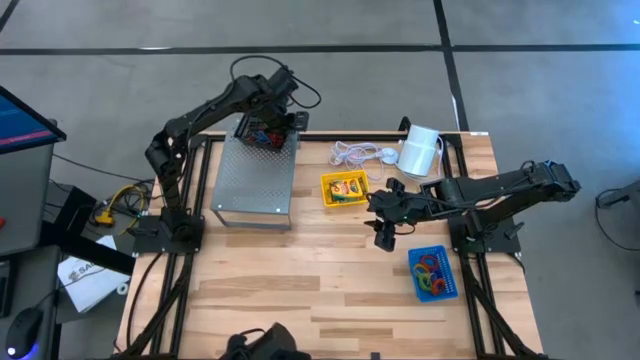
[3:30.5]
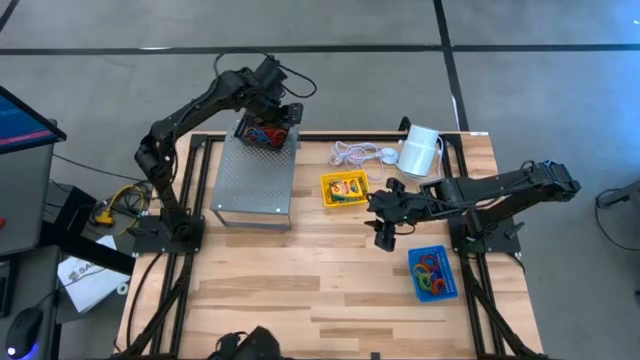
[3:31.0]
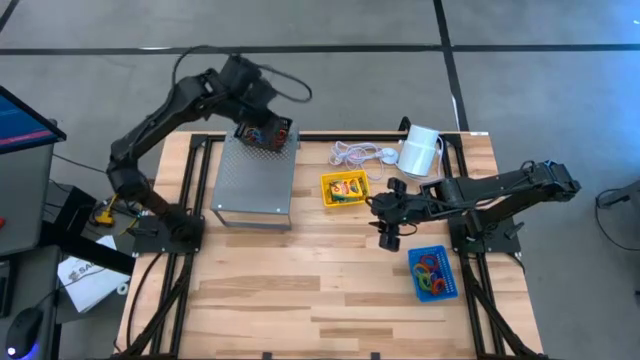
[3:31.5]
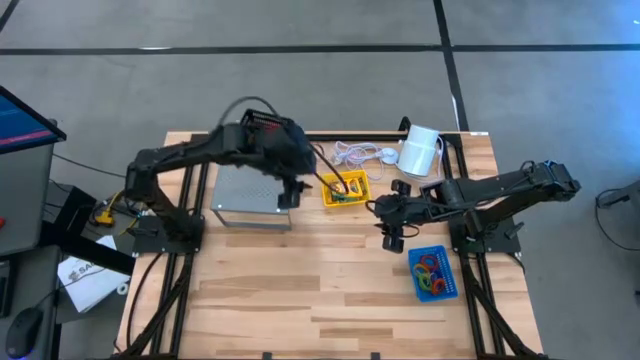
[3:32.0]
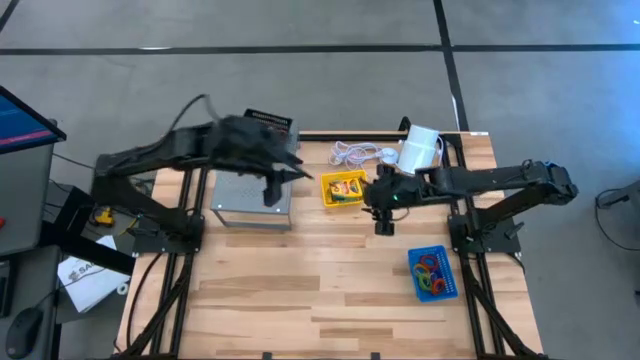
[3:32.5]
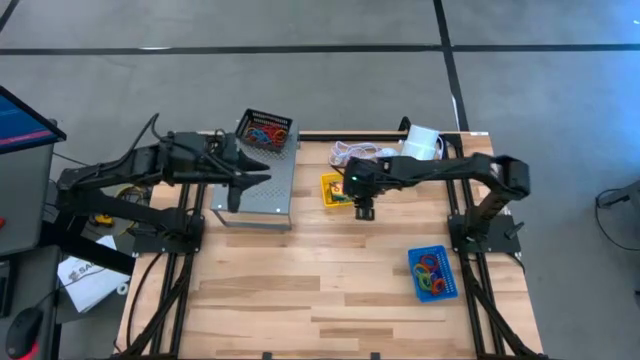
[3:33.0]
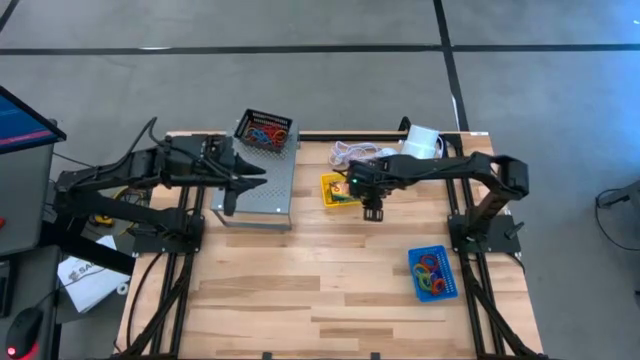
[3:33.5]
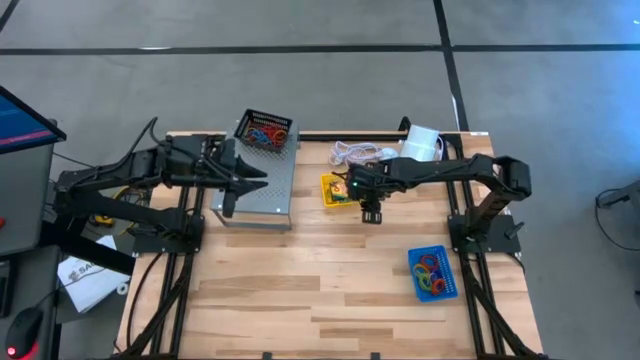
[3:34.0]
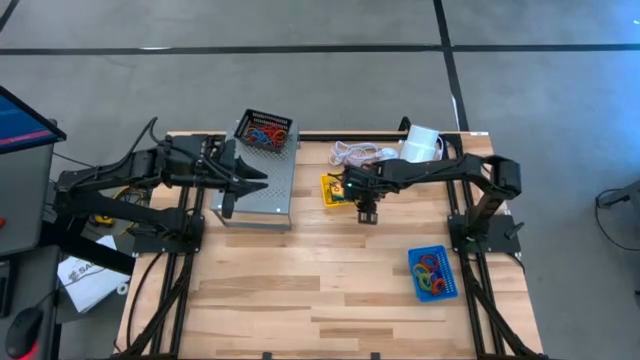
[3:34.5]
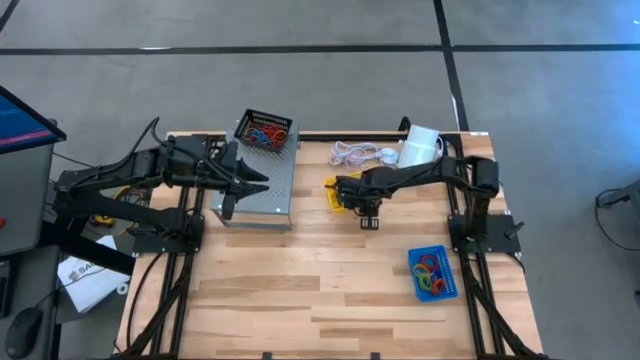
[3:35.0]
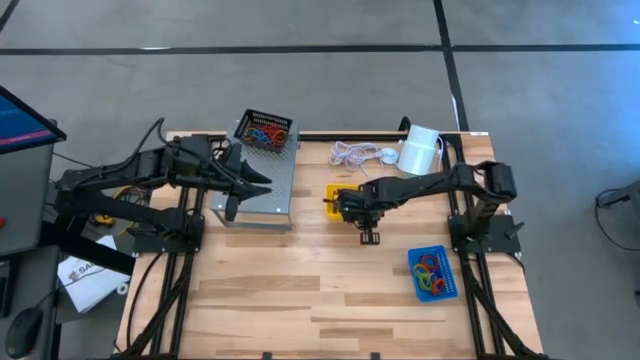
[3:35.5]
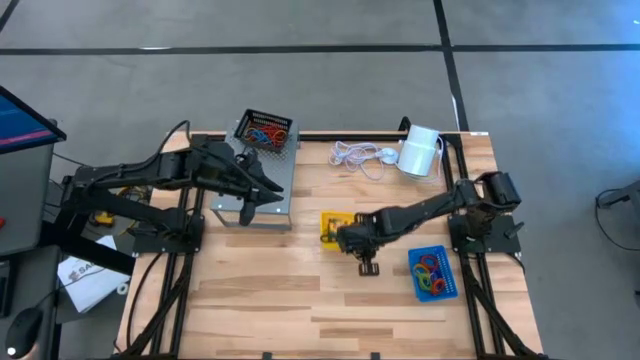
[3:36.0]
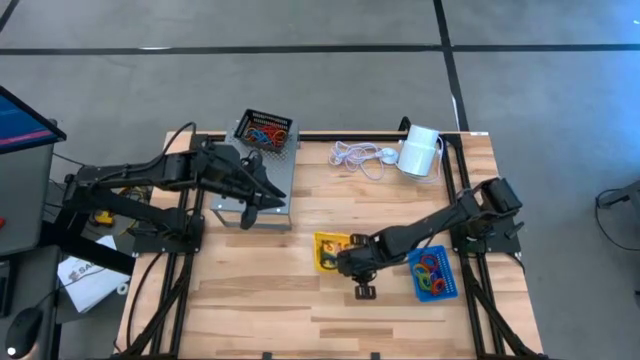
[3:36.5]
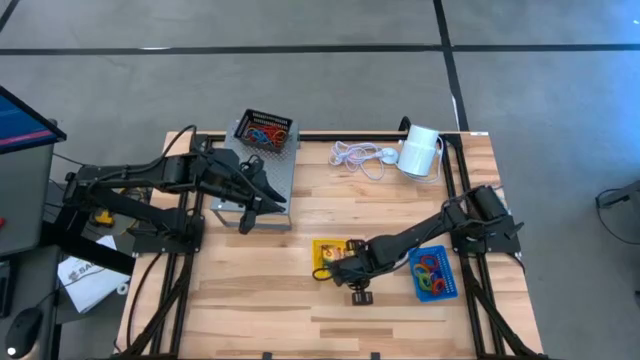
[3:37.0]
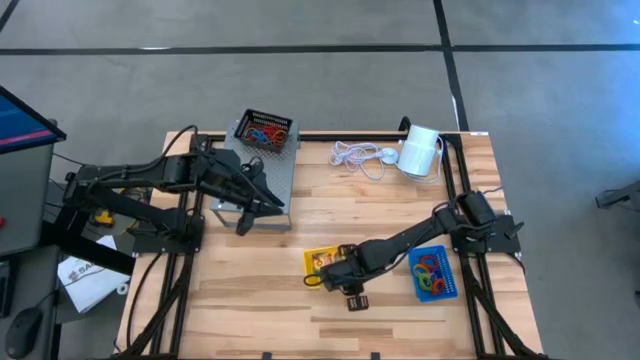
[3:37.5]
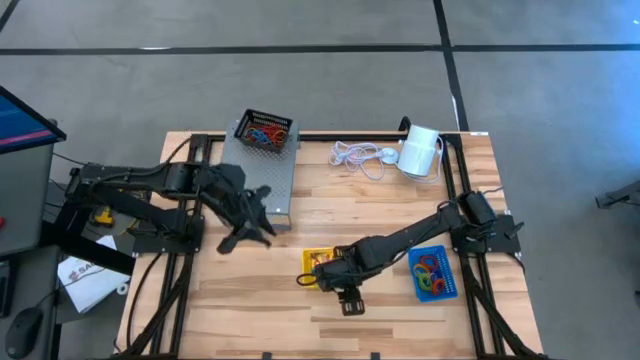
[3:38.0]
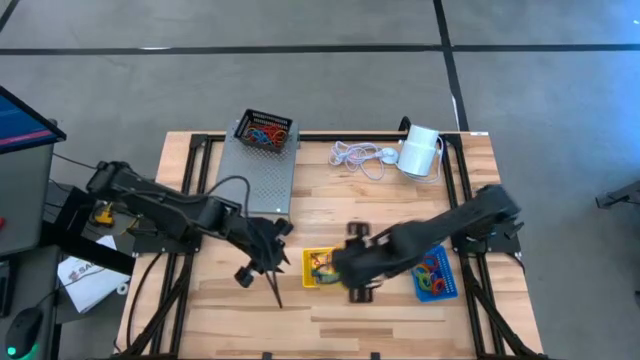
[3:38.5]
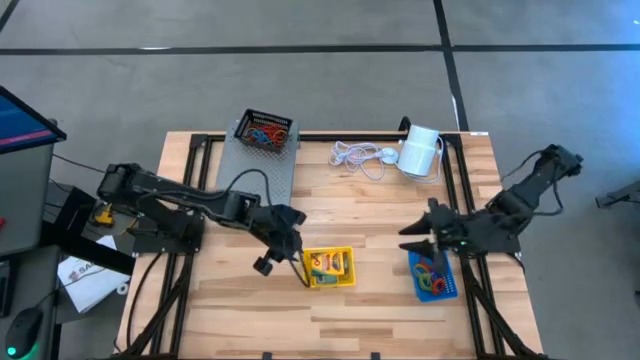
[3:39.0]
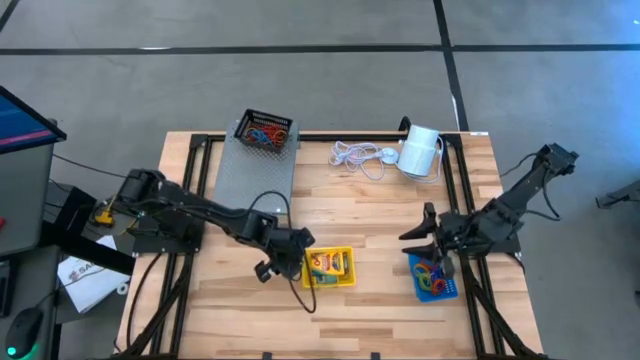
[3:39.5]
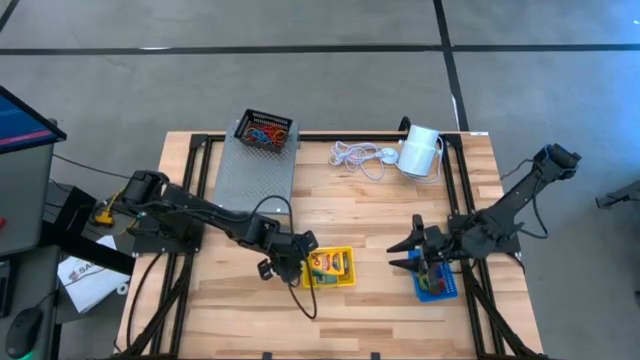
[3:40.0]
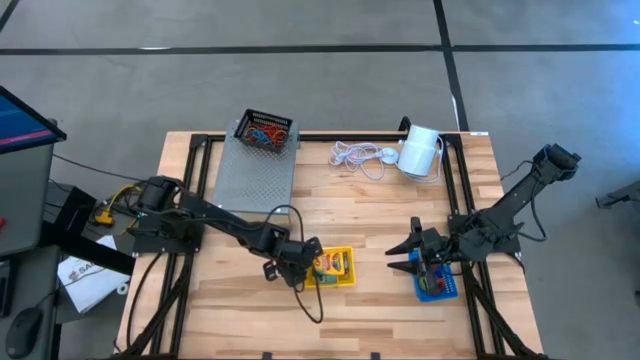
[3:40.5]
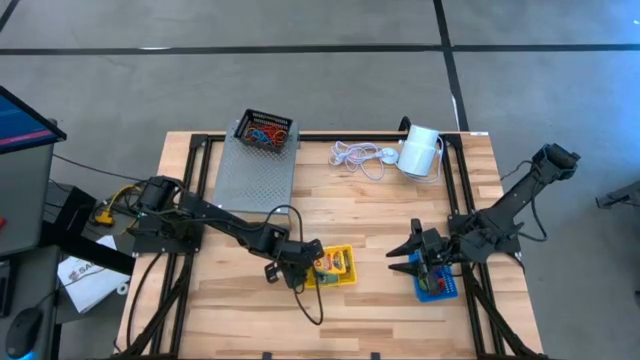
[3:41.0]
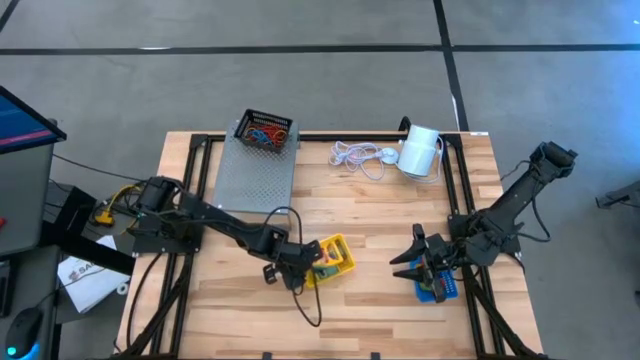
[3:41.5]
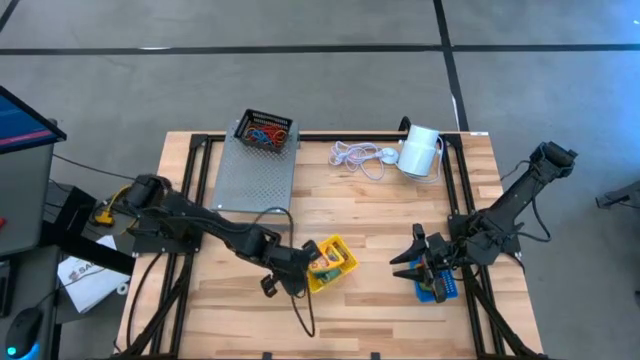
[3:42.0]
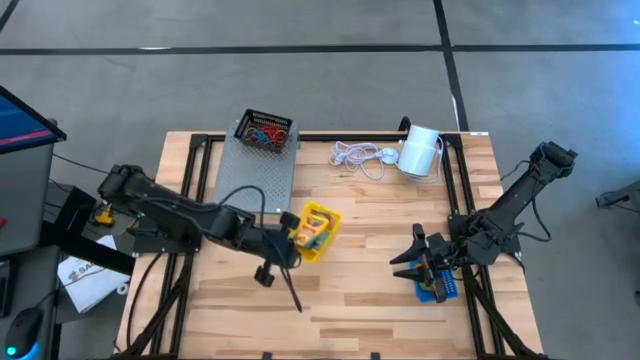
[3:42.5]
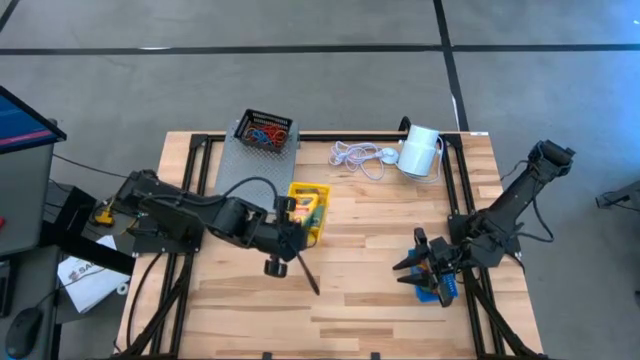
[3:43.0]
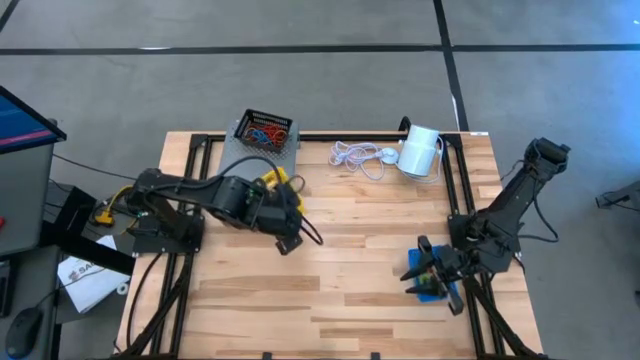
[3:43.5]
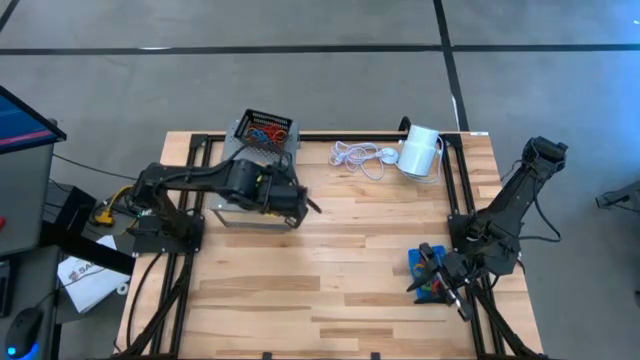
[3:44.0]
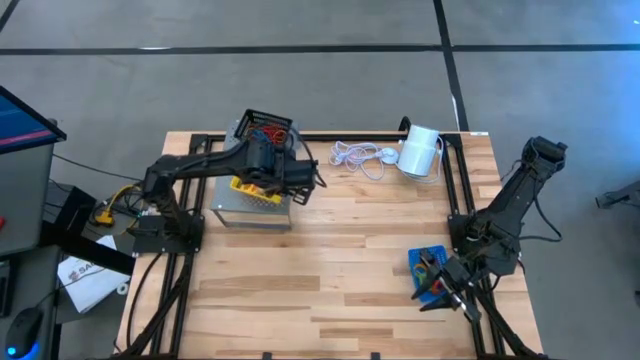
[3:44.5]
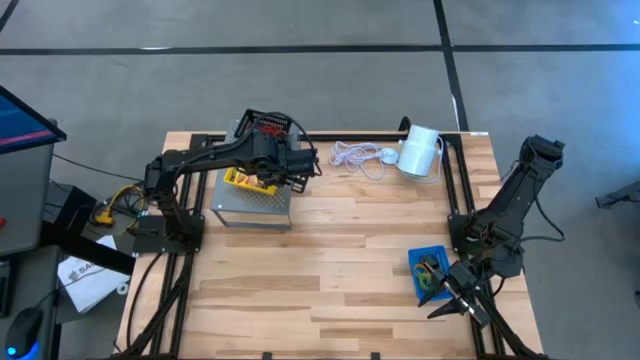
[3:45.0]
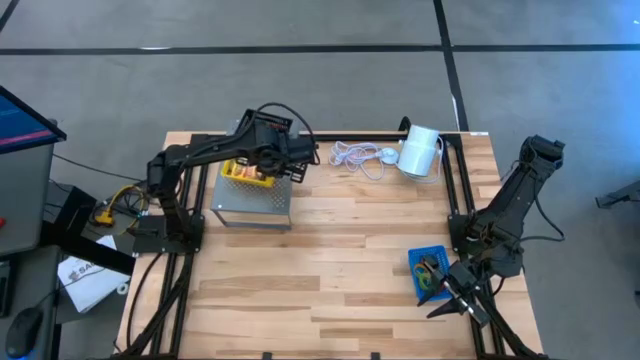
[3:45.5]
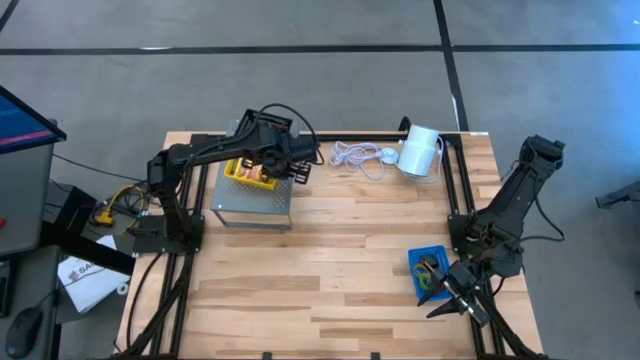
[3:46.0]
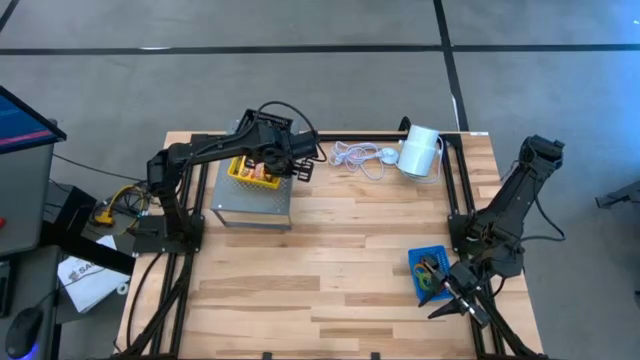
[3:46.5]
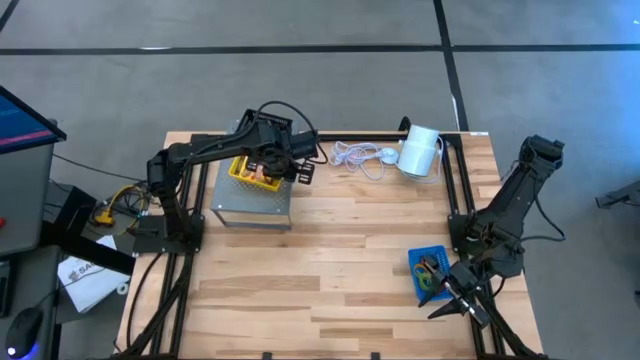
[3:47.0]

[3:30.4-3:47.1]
Task: Pick & Place Office Desk Supplies
Put the yellow bin with crayon boxes on the shelf
